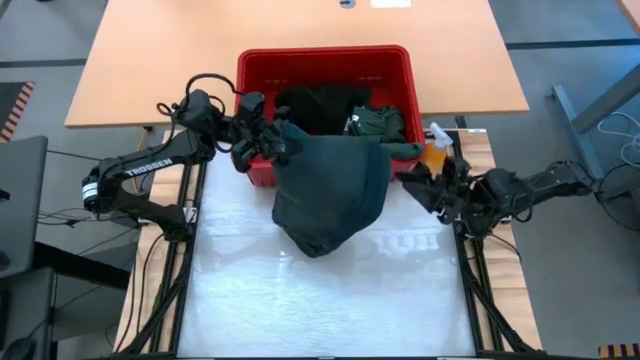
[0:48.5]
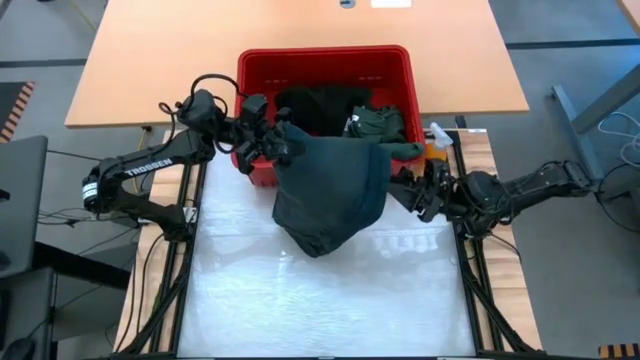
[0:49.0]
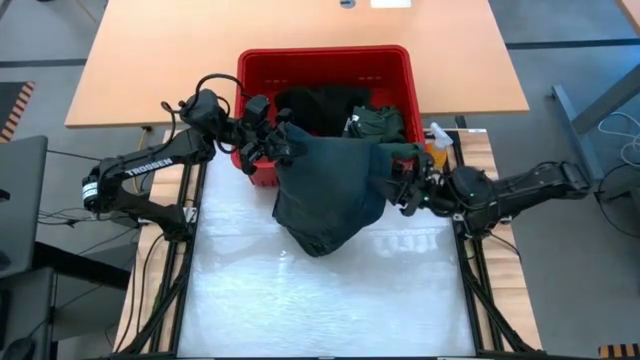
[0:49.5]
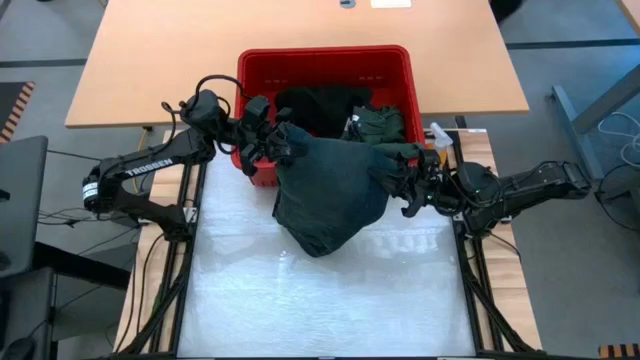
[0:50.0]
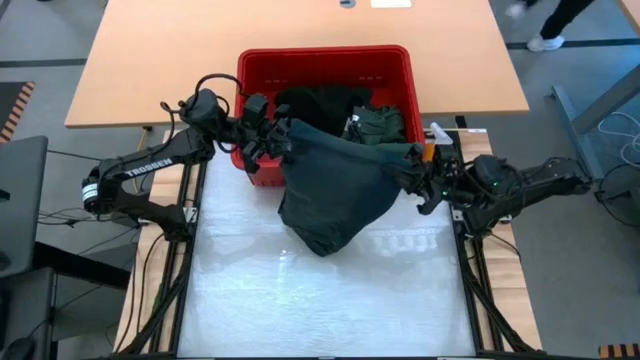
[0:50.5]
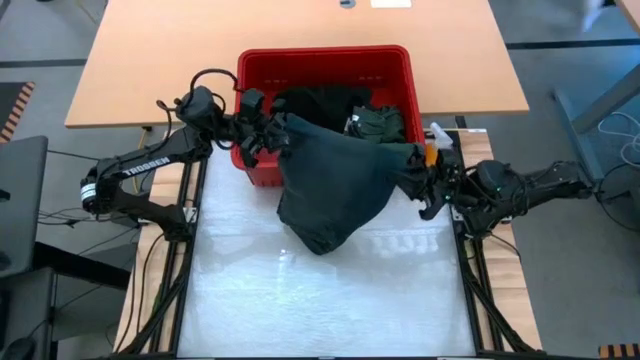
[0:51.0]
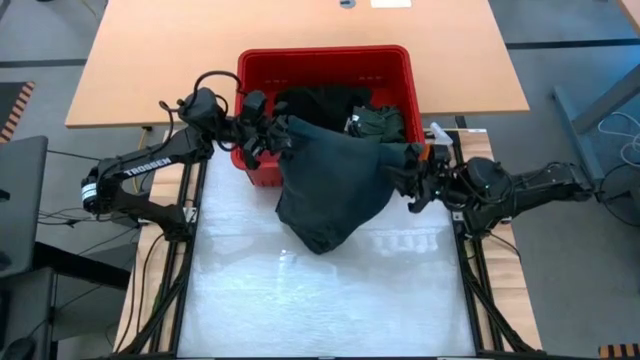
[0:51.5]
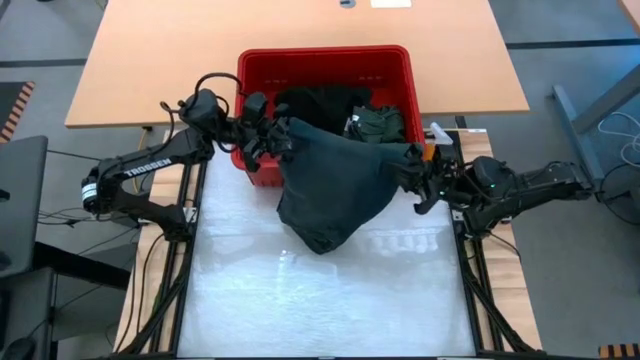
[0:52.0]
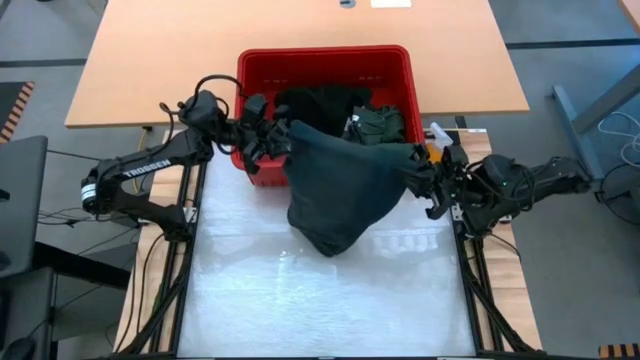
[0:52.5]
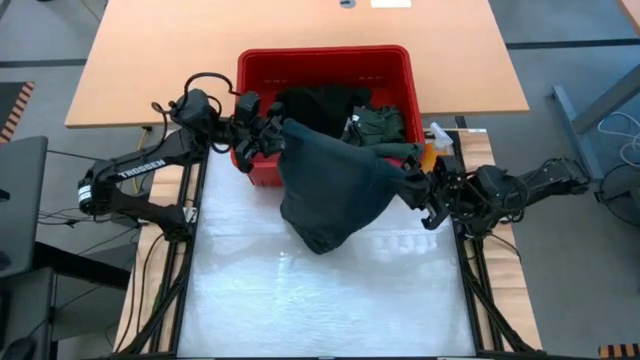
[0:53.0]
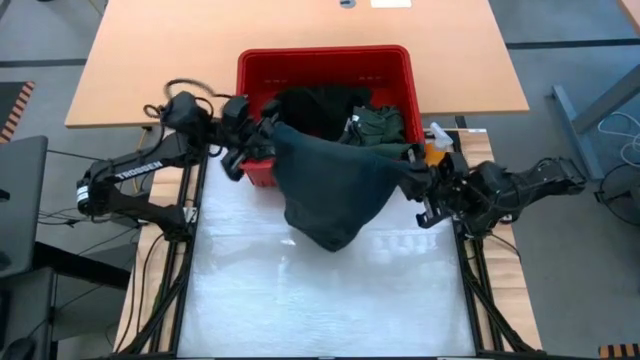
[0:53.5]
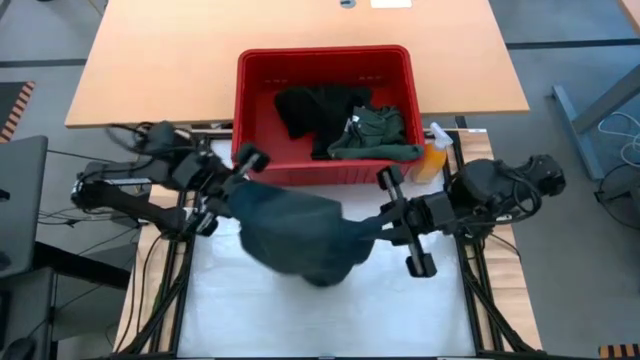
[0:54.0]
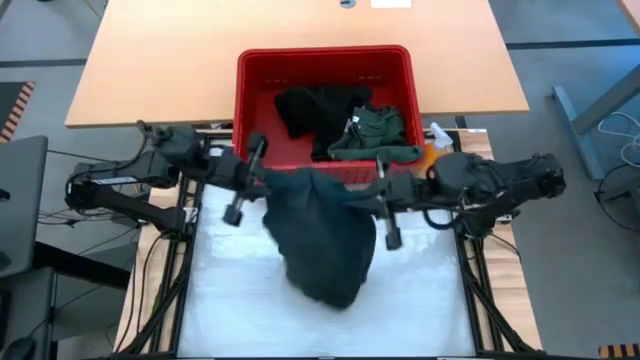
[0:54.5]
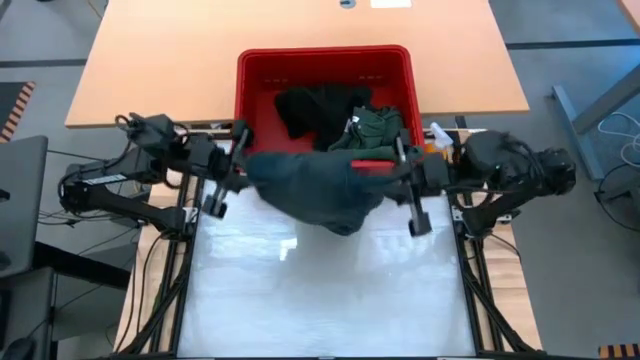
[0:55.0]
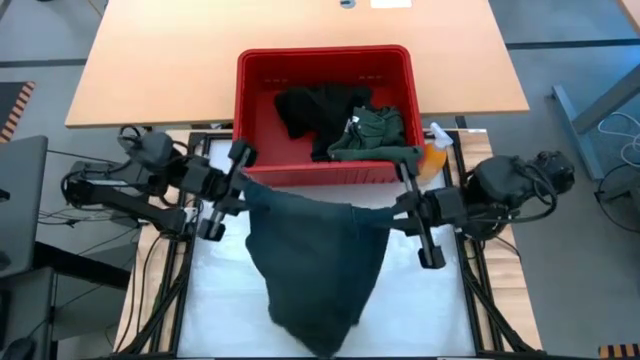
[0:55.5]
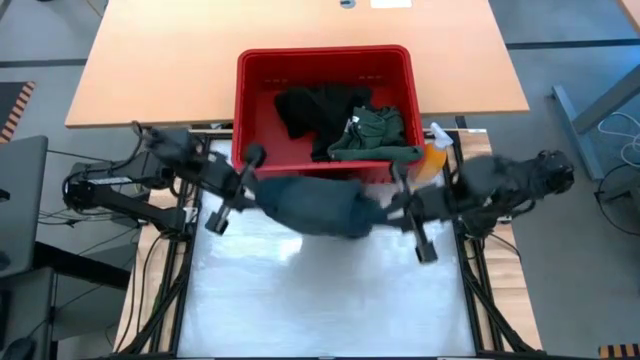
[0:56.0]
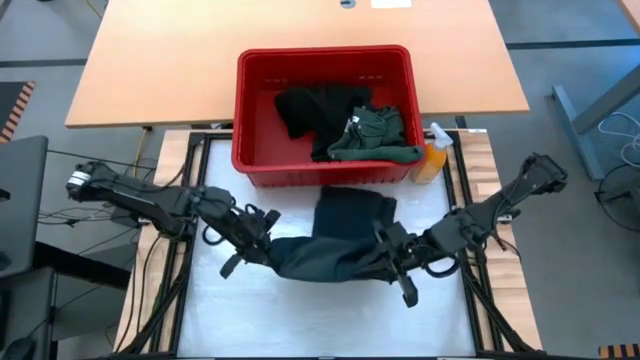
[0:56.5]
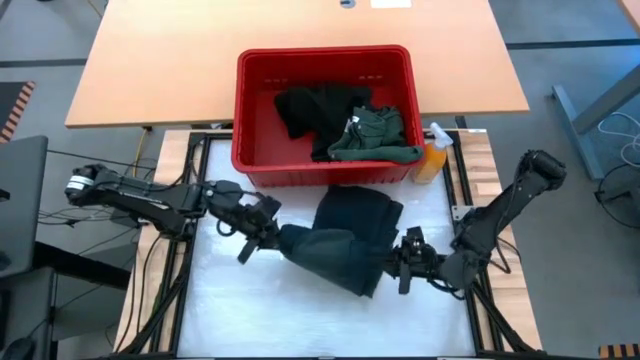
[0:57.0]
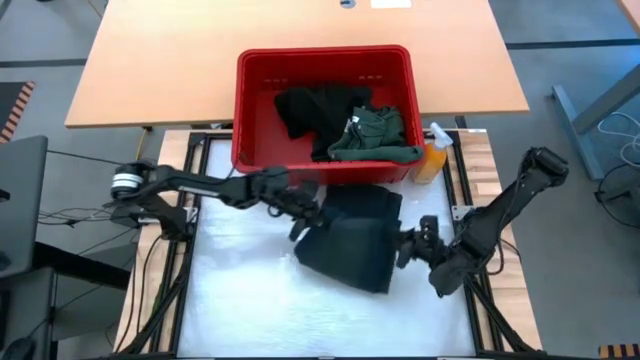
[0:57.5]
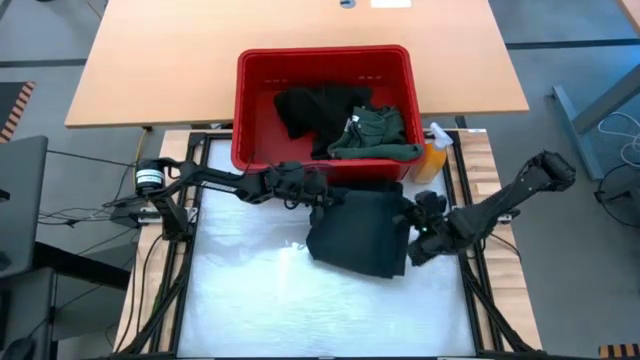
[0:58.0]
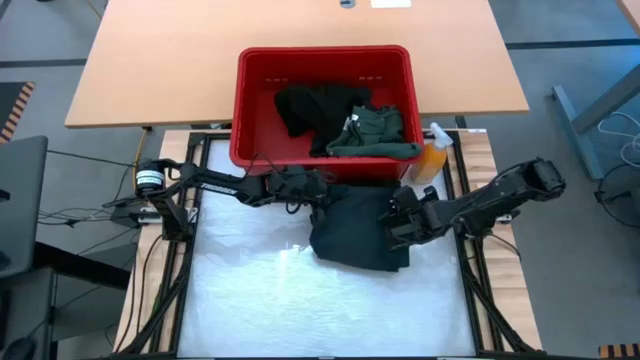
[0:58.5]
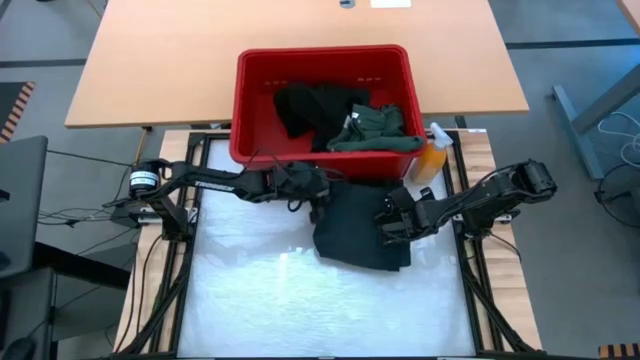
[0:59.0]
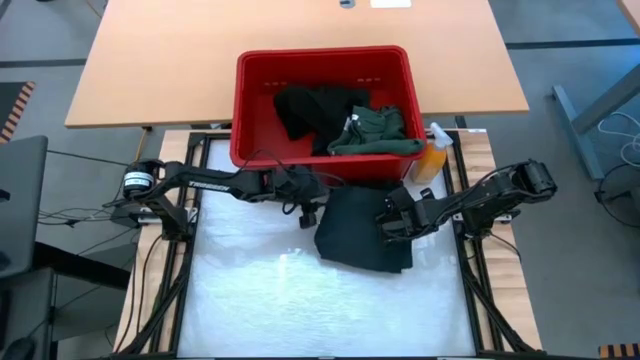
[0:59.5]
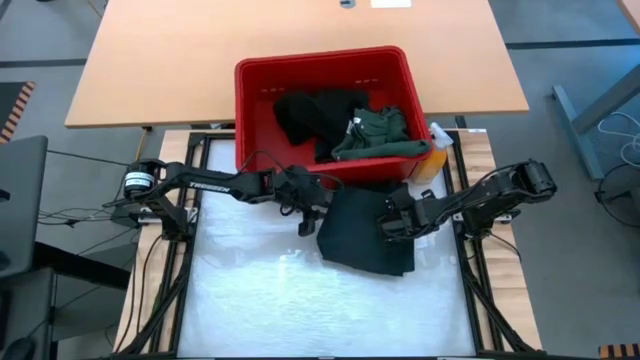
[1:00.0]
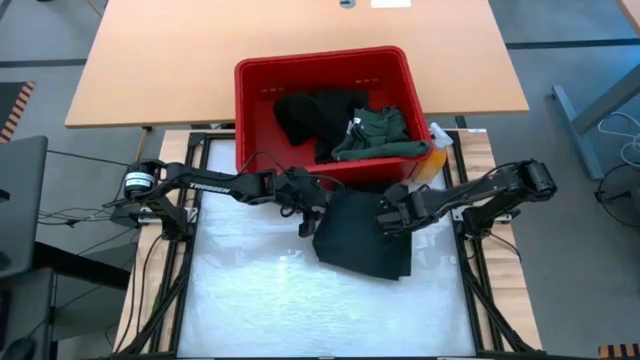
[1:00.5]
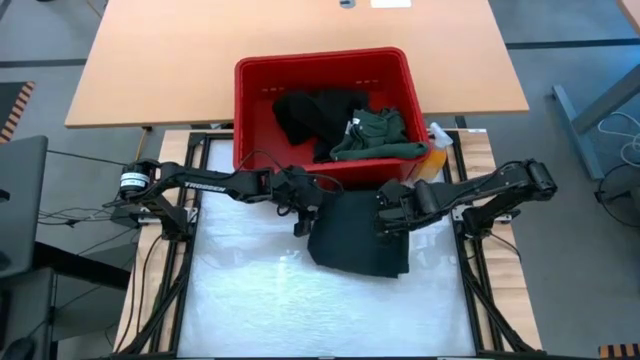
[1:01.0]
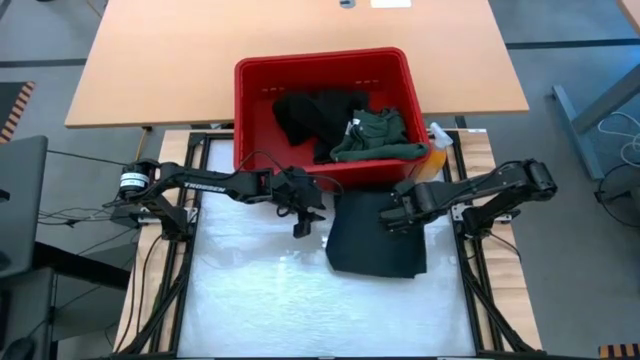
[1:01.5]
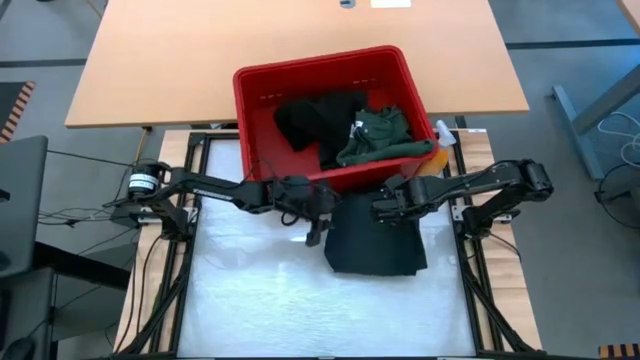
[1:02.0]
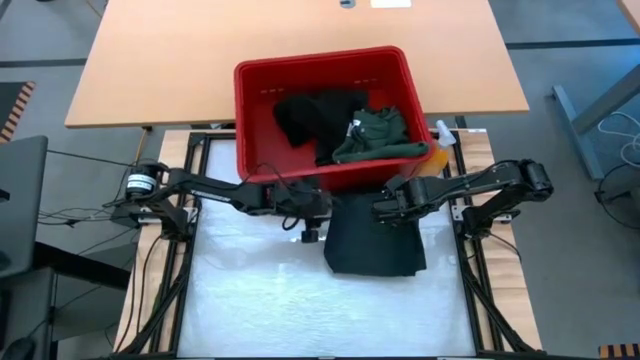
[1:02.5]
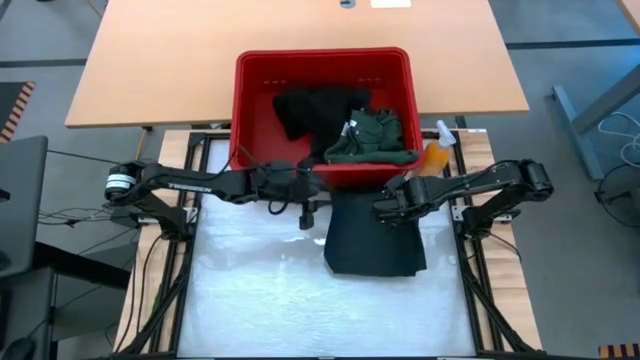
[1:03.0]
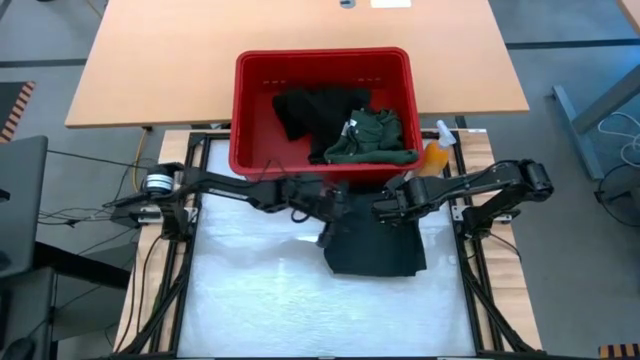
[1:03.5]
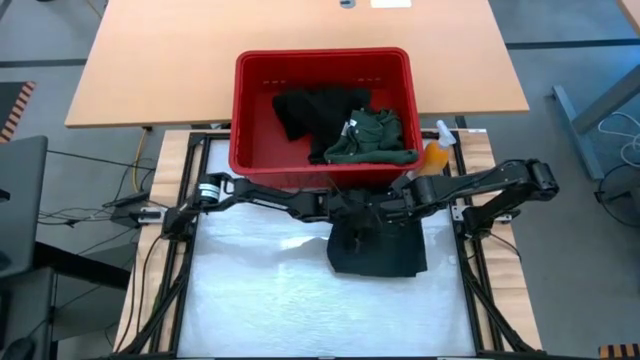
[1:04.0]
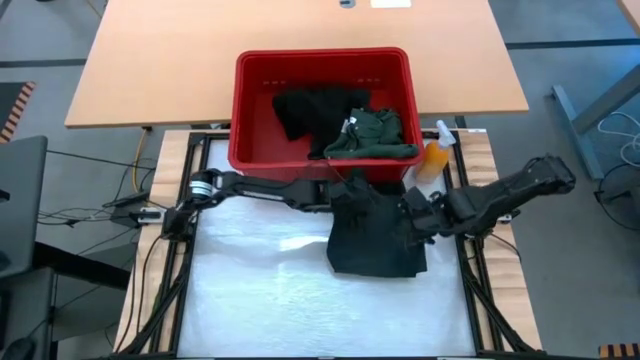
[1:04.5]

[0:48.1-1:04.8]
Task: Fold laundry
Fold the black pants

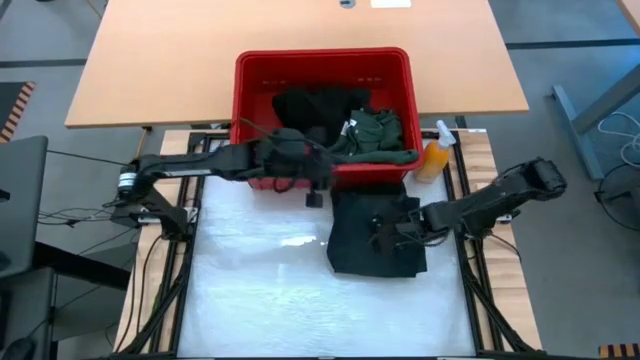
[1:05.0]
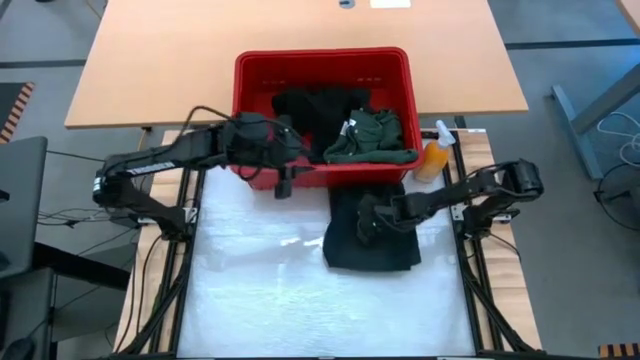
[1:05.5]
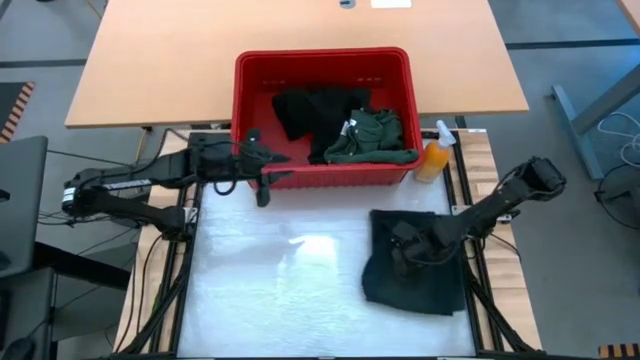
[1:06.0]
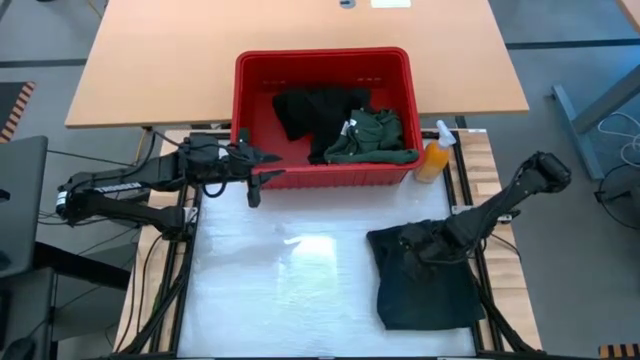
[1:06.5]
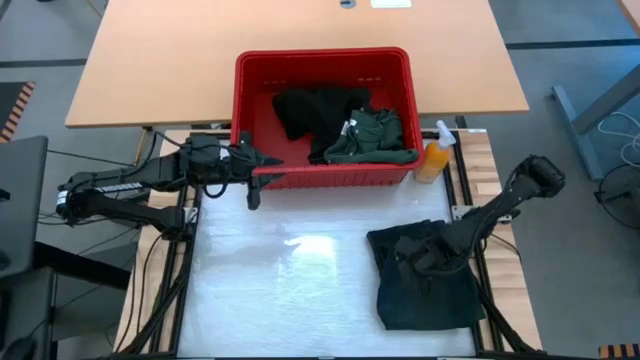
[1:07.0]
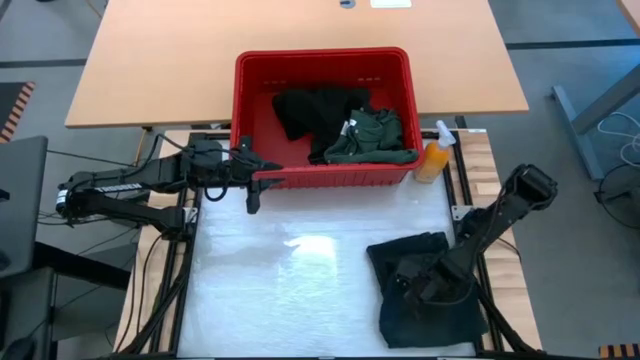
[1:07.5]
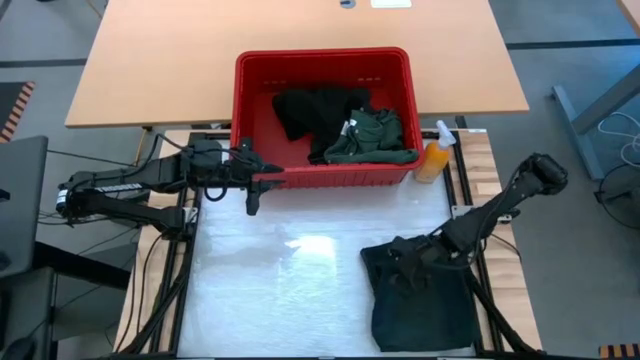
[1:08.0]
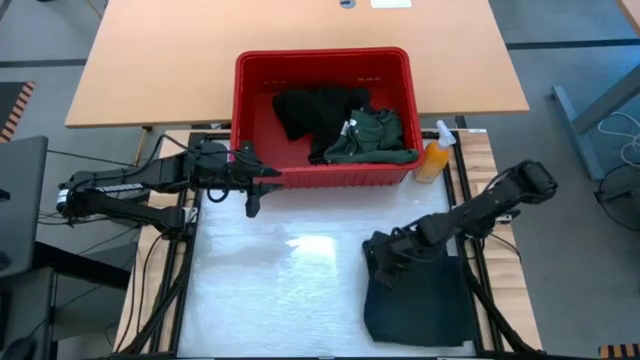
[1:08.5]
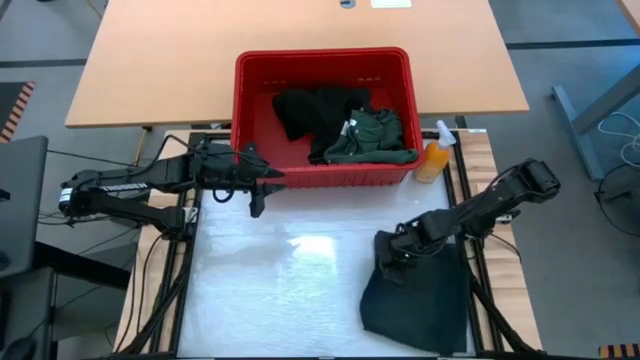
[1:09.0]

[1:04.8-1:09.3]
Move the black pants to the bottom right of the table
